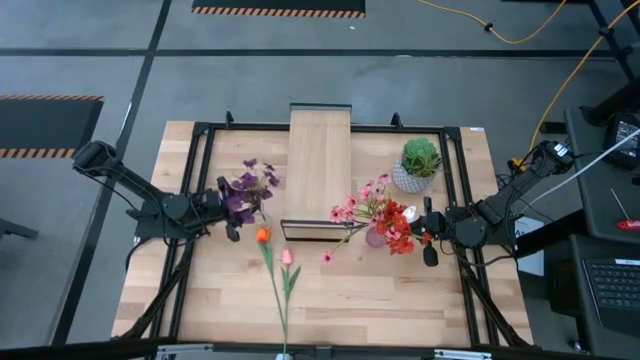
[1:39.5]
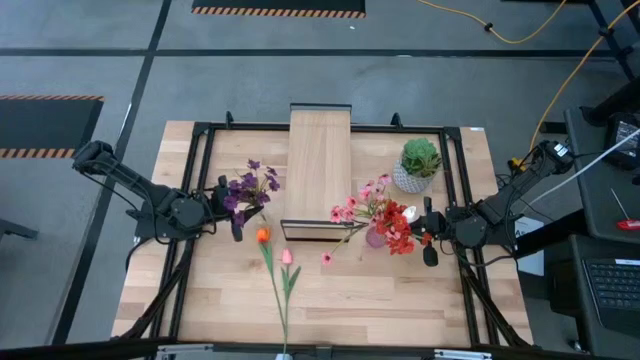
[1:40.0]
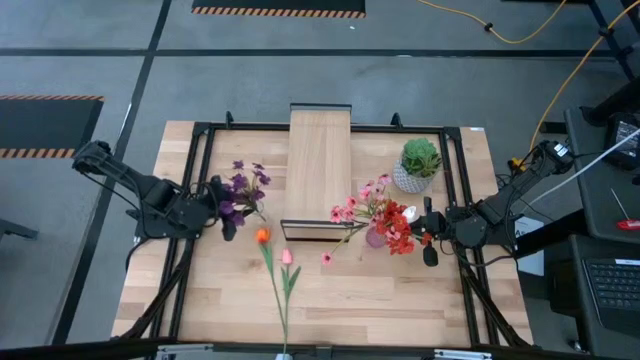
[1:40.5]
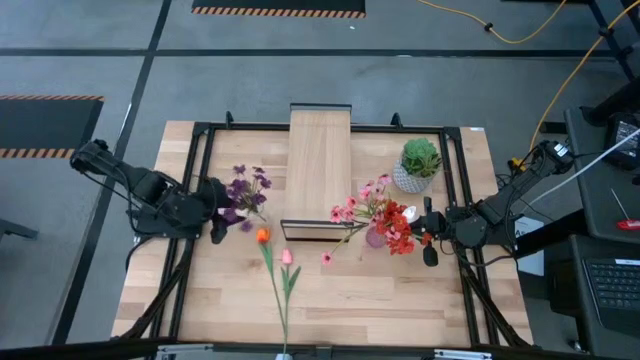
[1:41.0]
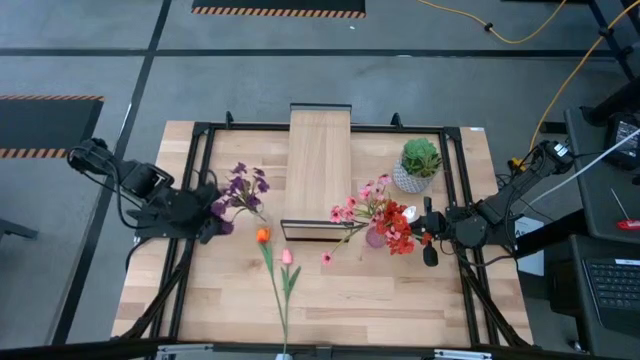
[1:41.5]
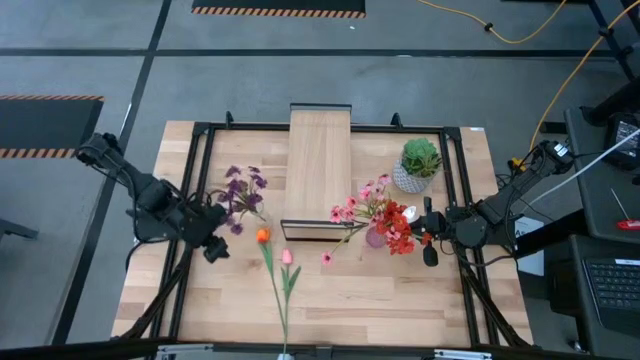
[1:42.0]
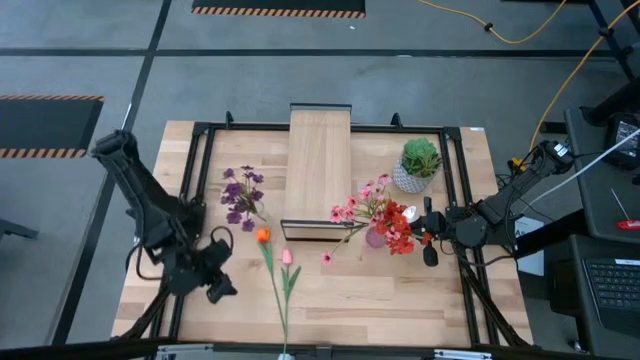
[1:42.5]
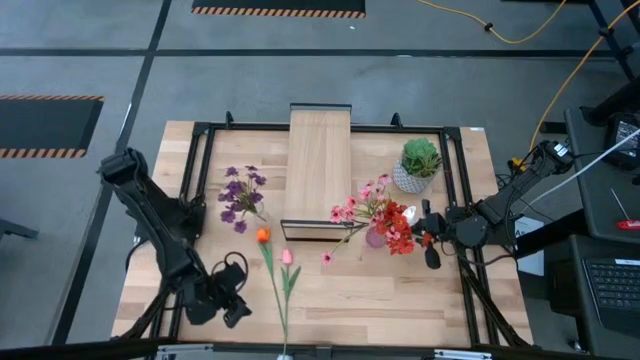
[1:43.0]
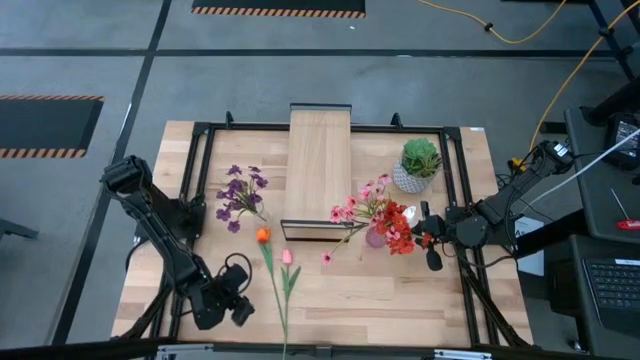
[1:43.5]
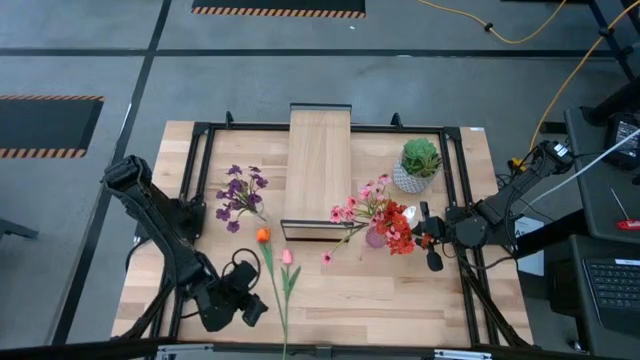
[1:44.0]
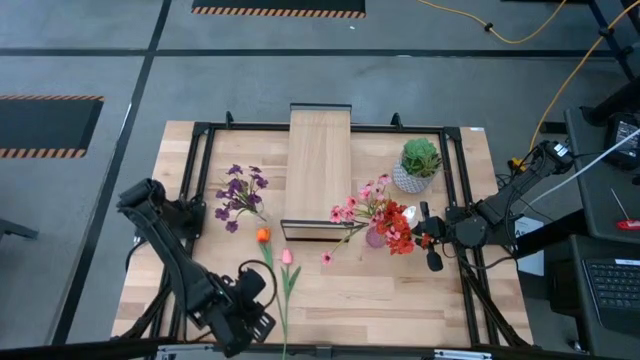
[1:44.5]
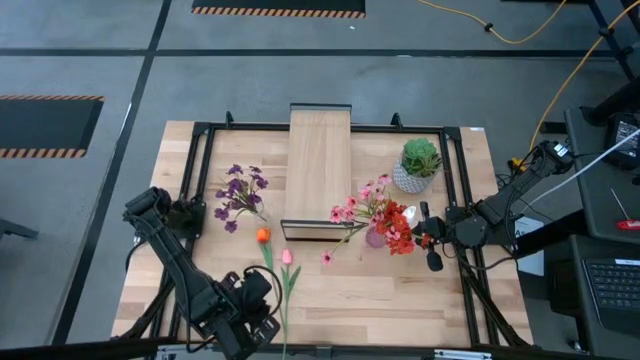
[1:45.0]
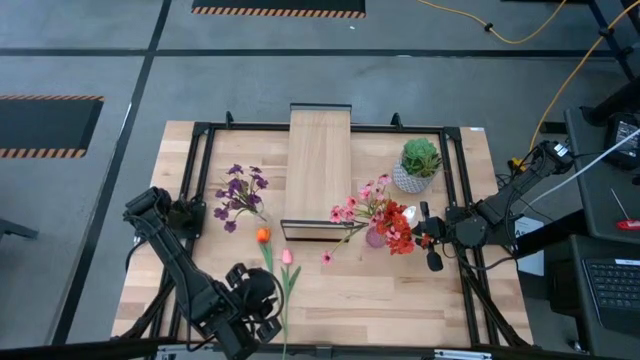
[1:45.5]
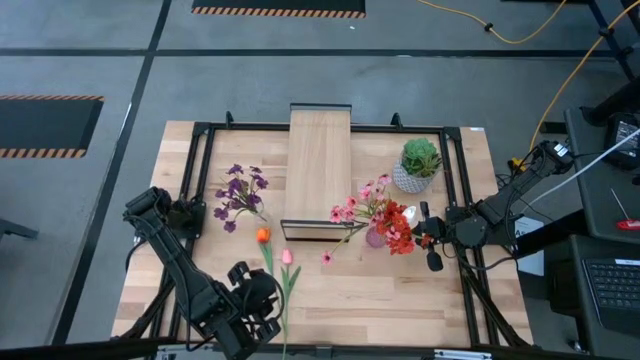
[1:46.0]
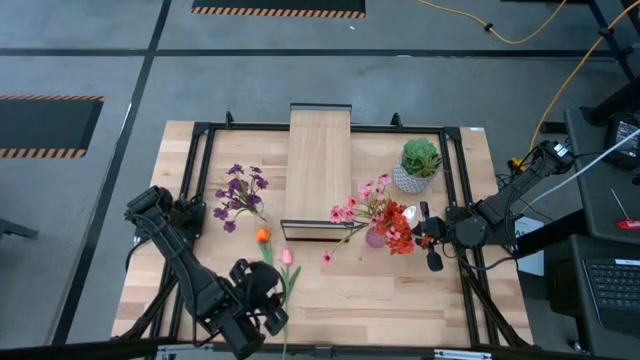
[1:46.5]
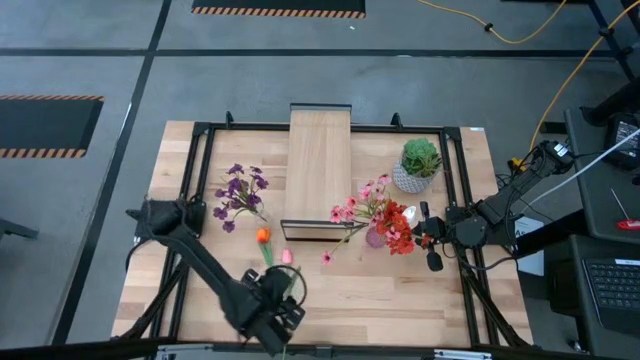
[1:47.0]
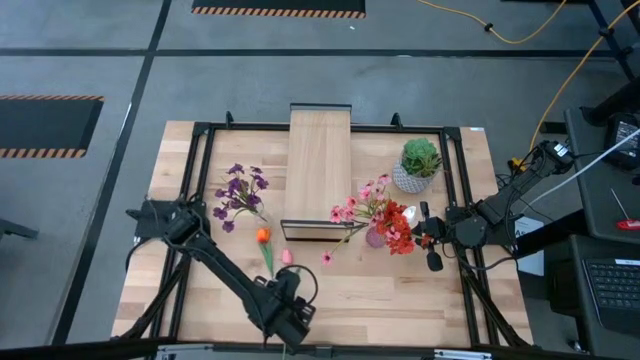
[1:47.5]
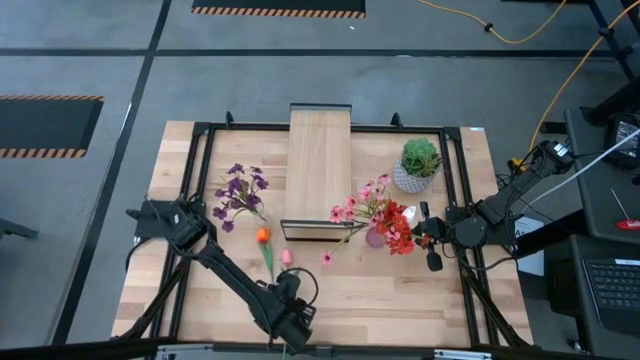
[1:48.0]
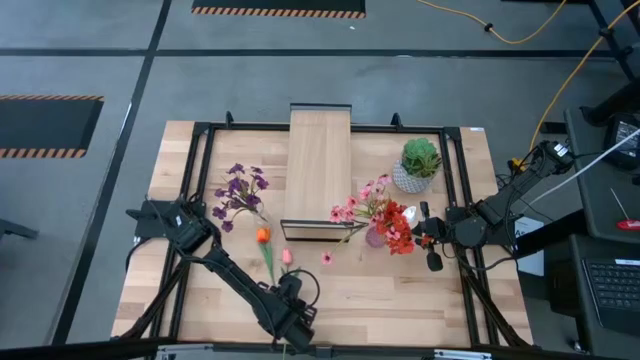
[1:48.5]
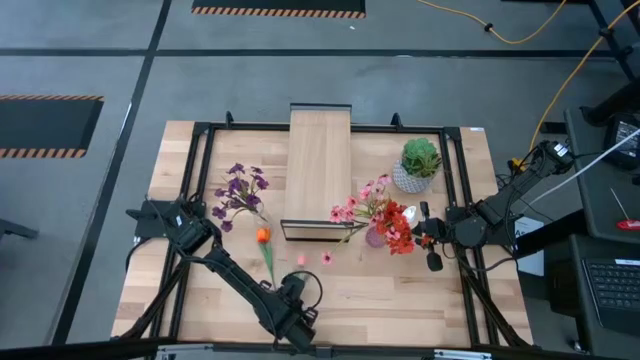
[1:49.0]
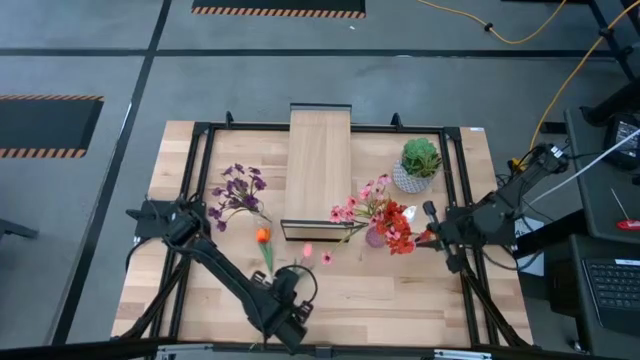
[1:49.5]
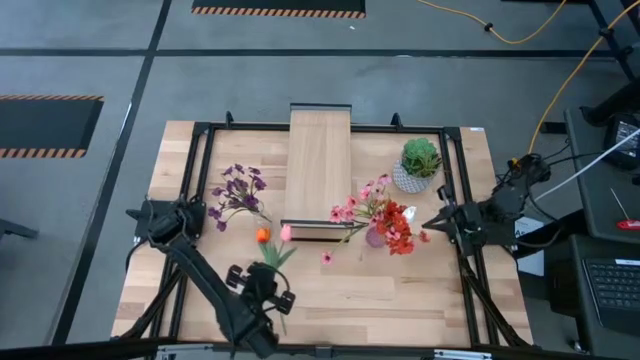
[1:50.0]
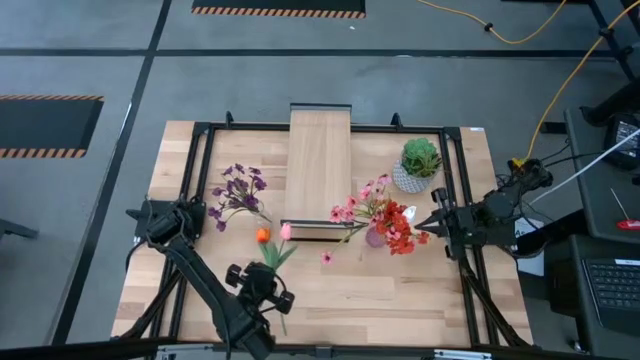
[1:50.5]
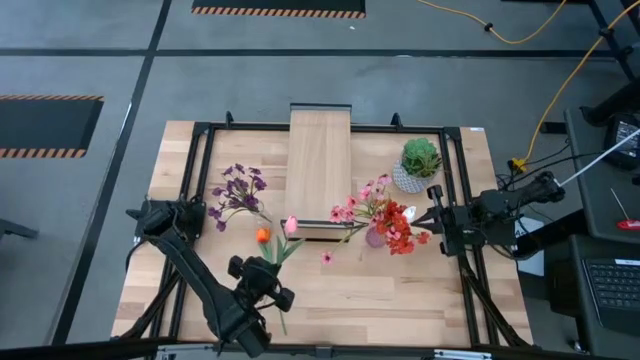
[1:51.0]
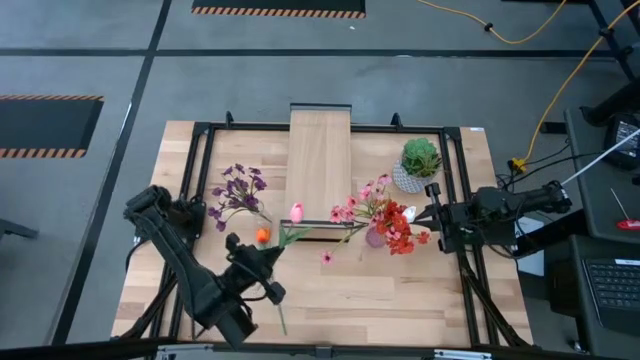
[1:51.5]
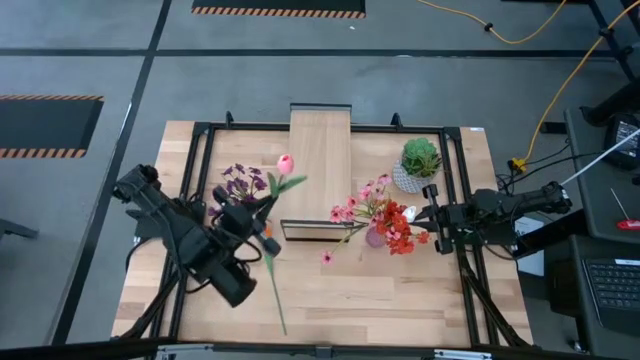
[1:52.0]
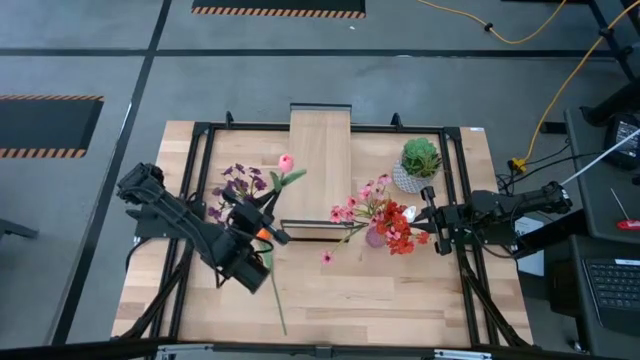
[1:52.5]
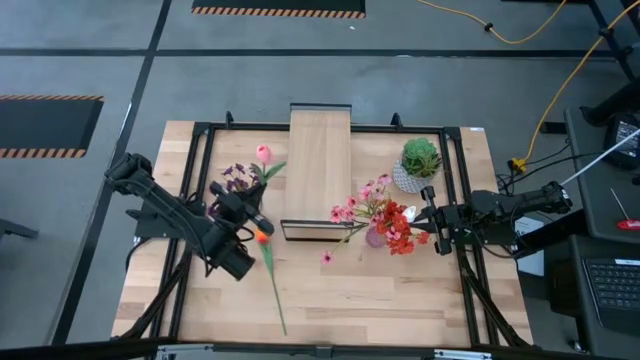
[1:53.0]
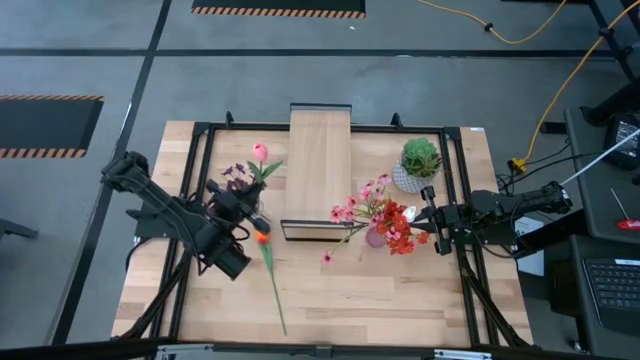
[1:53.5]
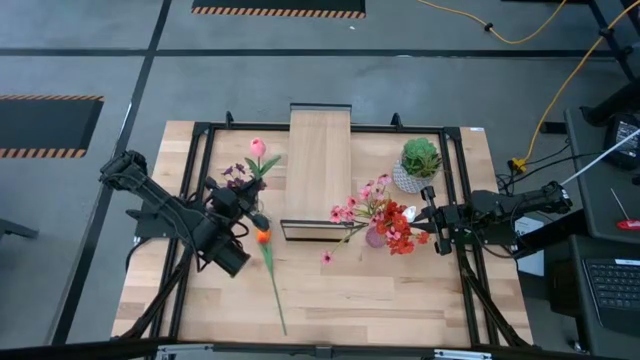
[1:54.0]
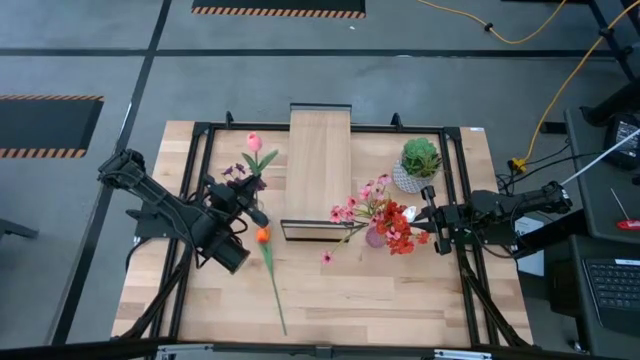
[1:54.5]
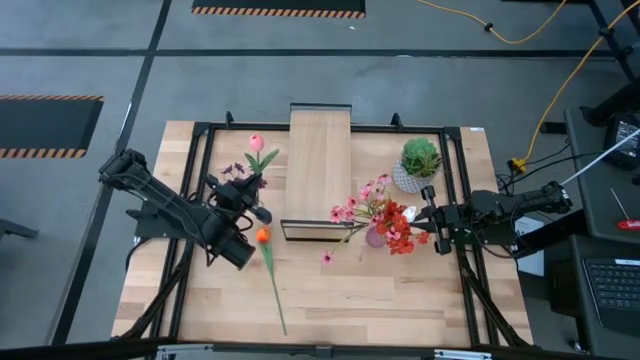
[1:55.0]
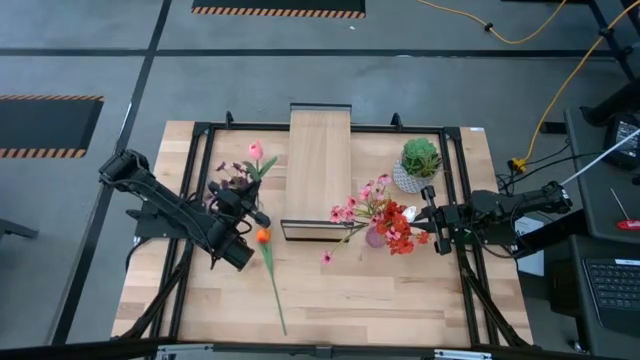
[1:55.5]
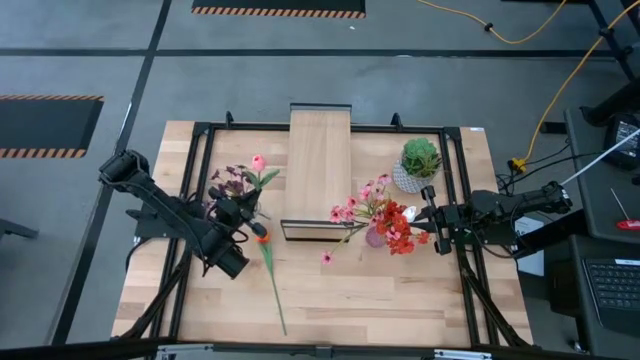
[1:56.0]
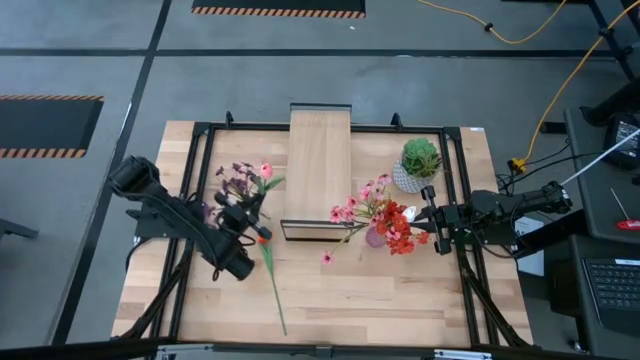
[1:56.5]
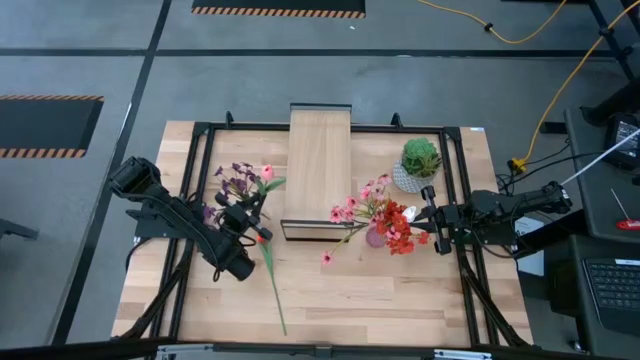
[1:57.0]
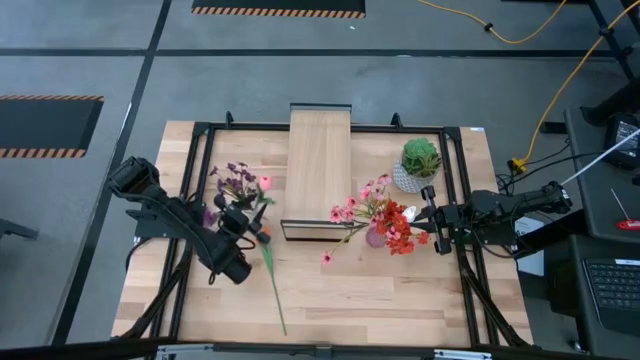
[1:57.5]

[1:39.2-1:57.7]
Task: Pick and place flowers into a vace then onto a shelf
Put the pink tulip into the transparent vase

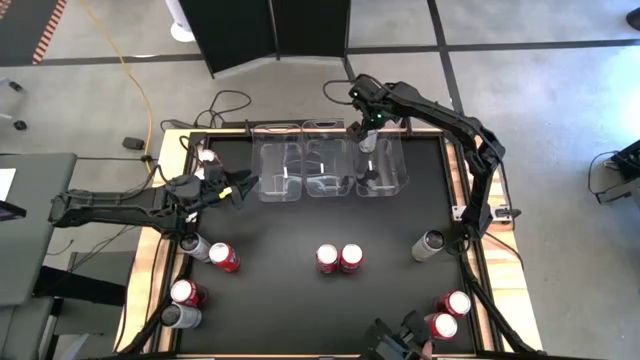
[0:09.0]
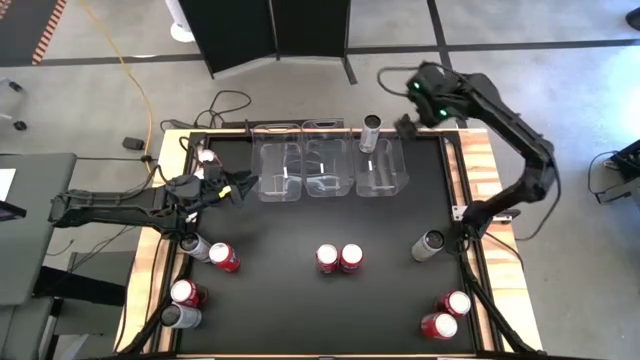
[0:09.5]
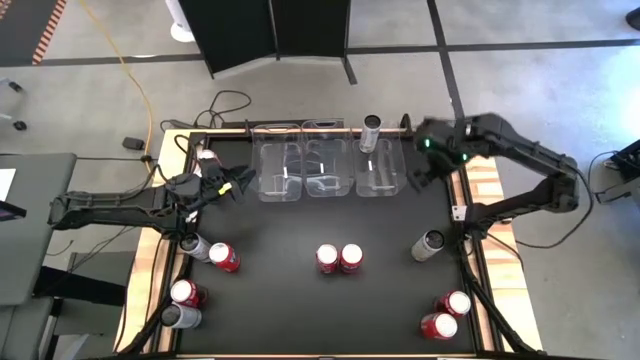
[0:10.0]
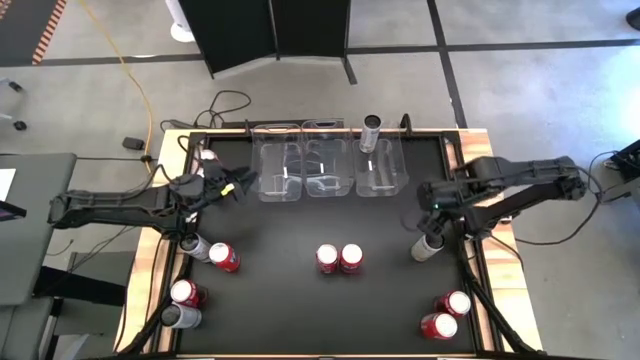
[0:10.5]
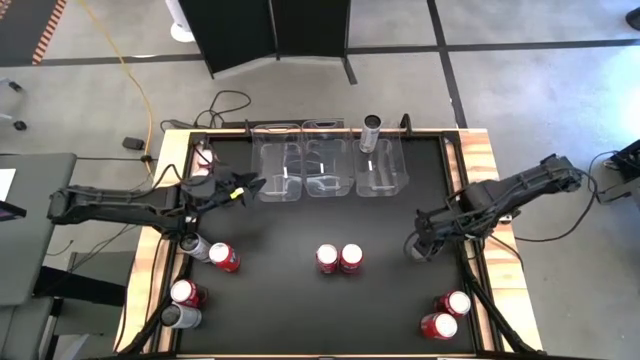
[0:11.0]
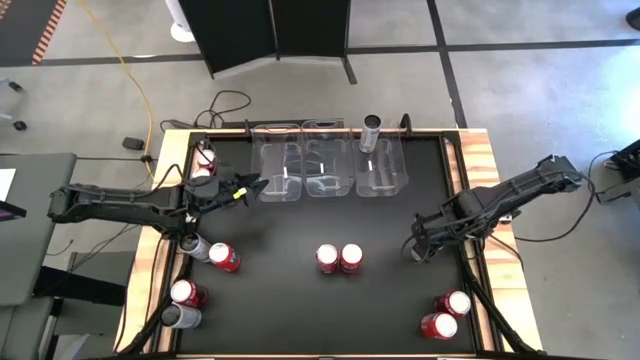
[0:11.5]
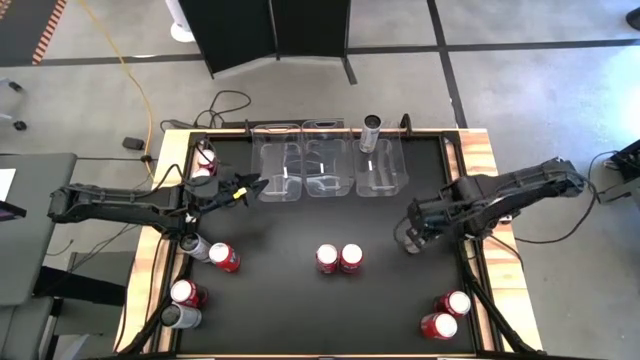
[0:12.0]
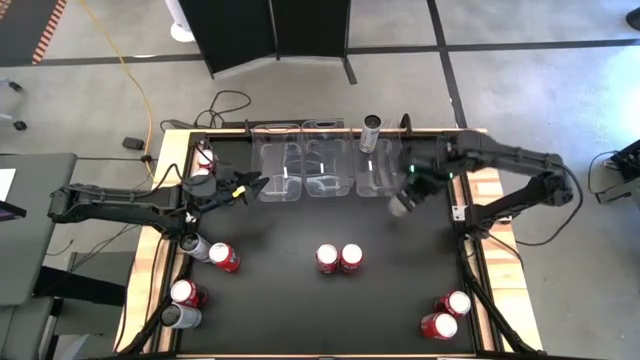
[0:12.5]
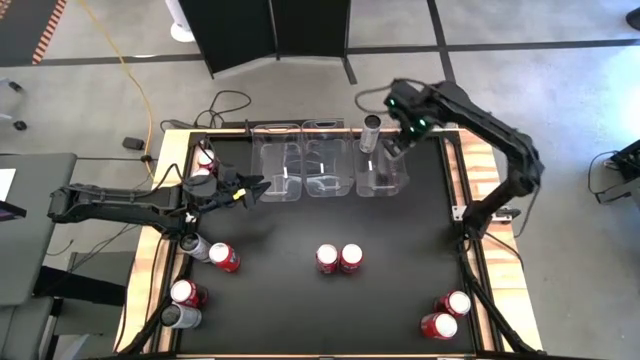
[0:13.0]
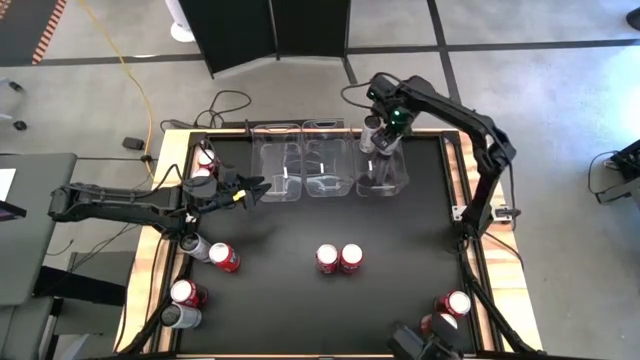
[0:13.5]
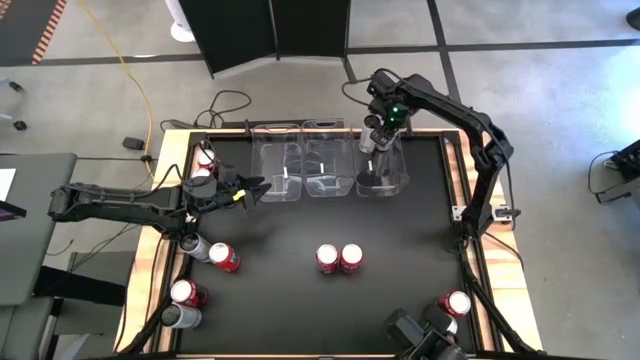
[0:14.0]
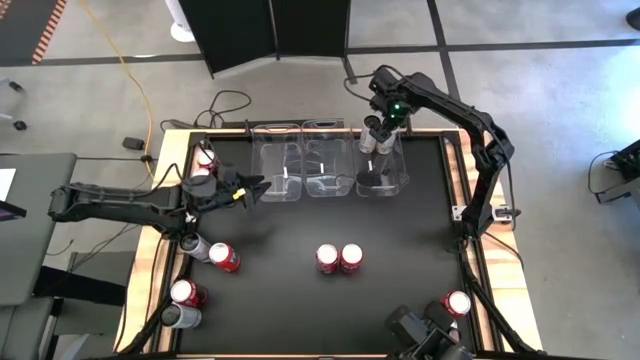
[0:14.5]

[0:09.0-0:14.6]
Task: Sort soda cans
Put the top right white-yellow soda can into the right transparent bin
